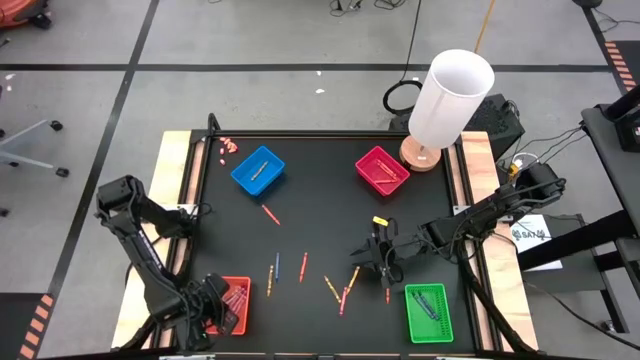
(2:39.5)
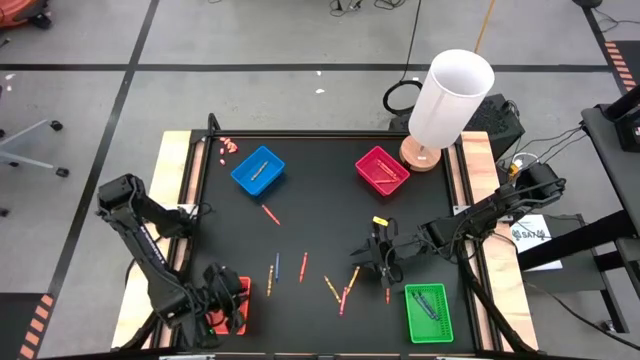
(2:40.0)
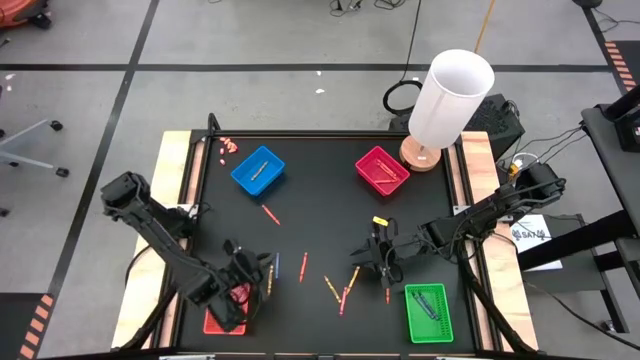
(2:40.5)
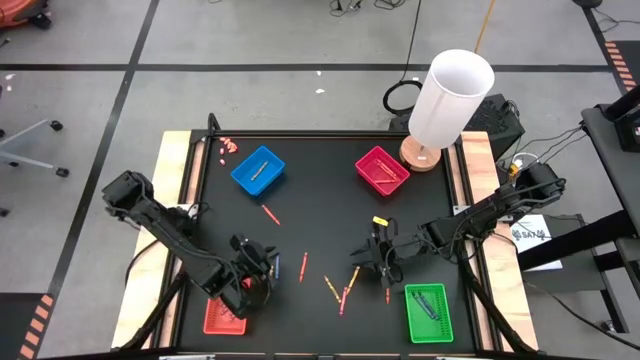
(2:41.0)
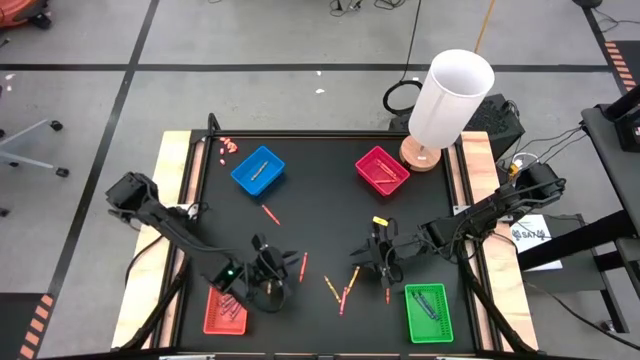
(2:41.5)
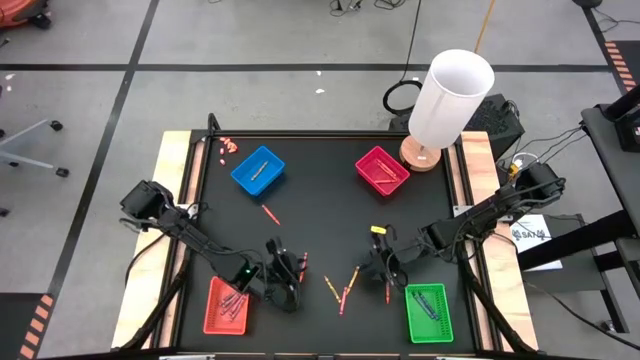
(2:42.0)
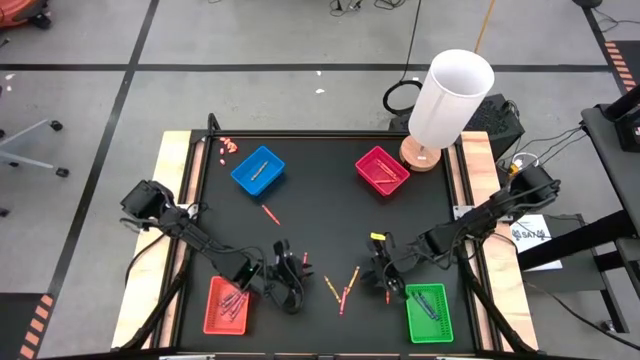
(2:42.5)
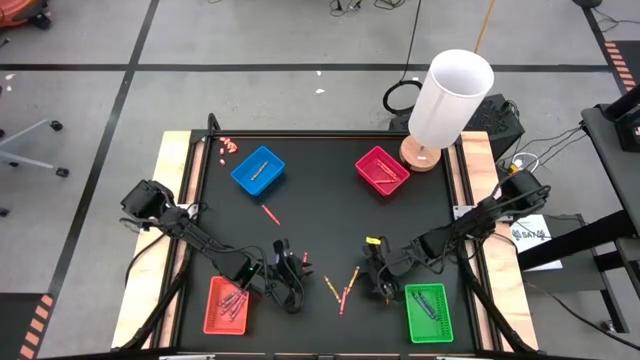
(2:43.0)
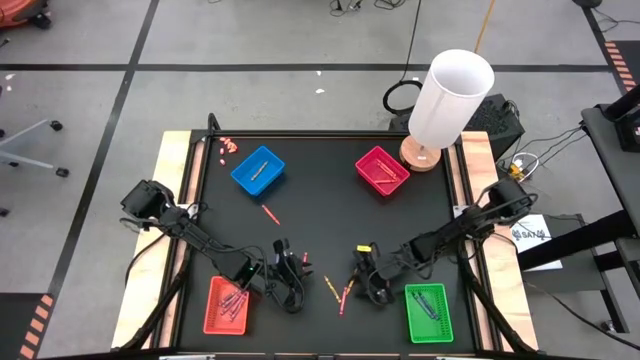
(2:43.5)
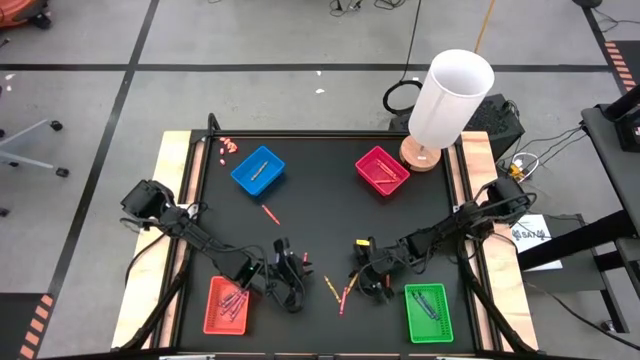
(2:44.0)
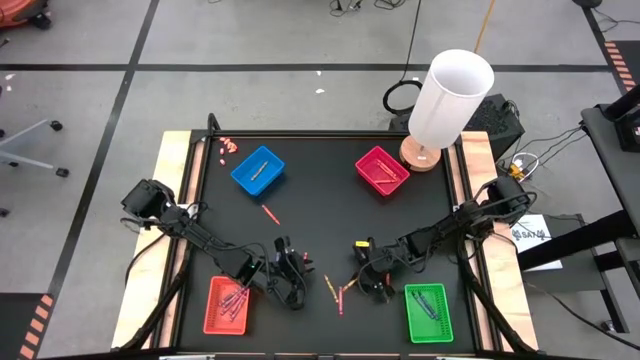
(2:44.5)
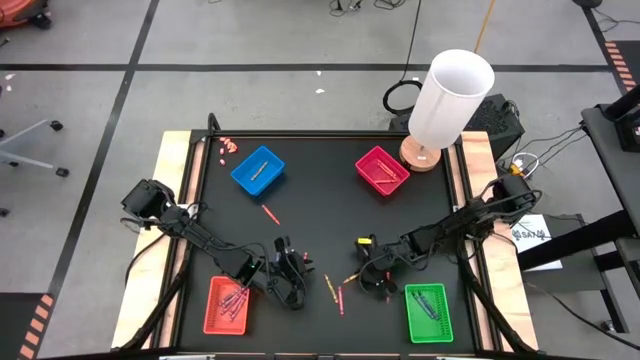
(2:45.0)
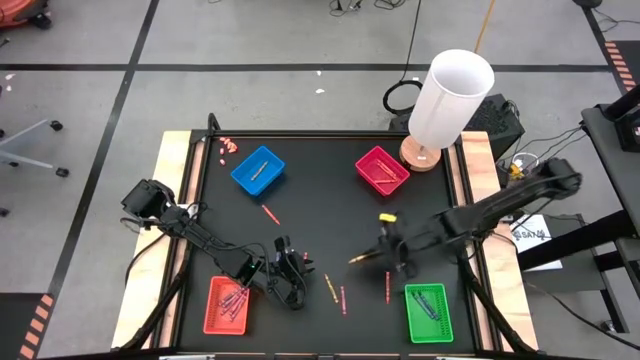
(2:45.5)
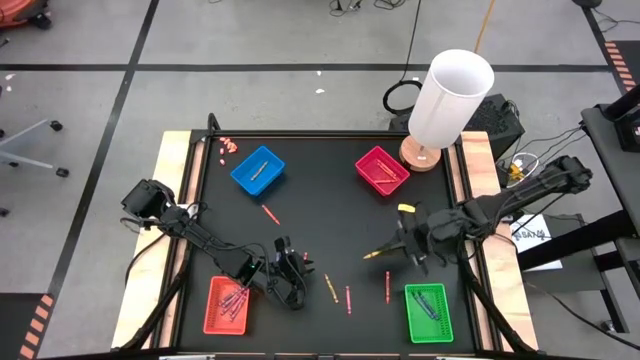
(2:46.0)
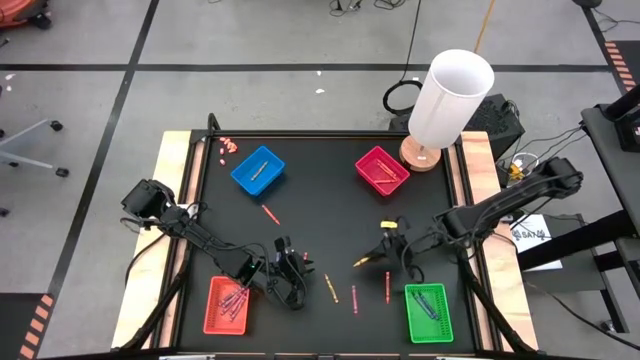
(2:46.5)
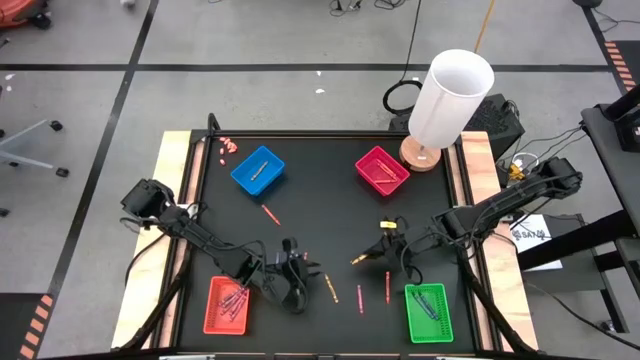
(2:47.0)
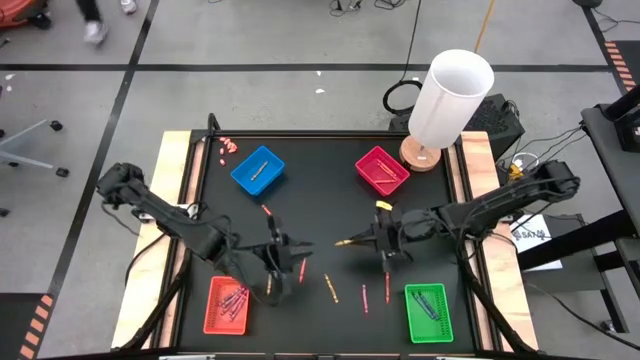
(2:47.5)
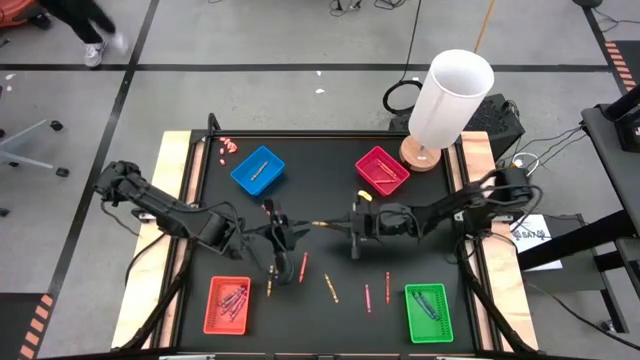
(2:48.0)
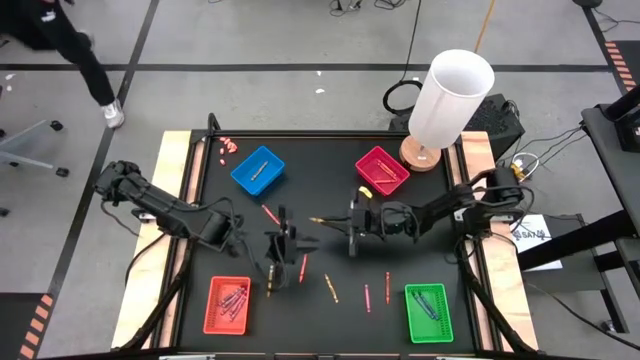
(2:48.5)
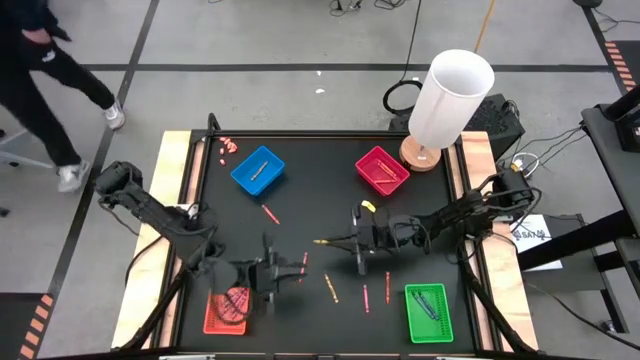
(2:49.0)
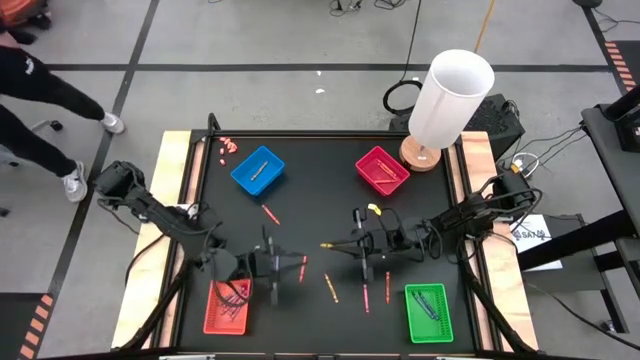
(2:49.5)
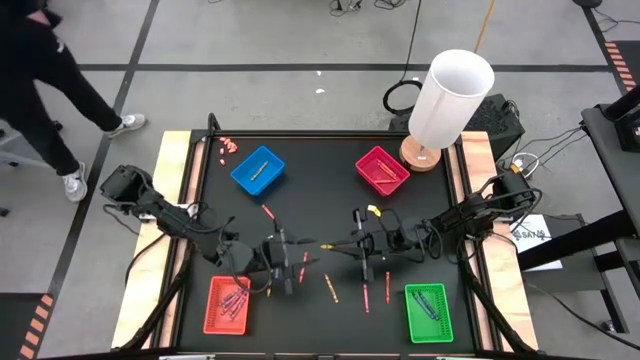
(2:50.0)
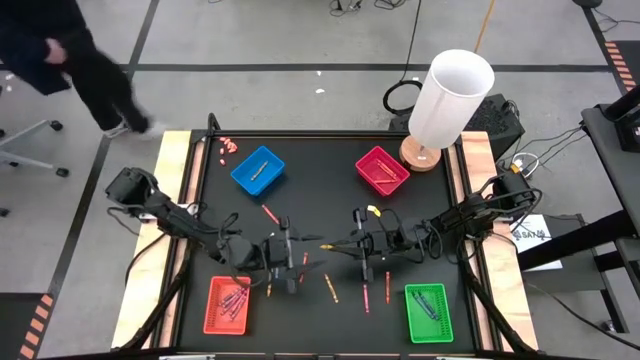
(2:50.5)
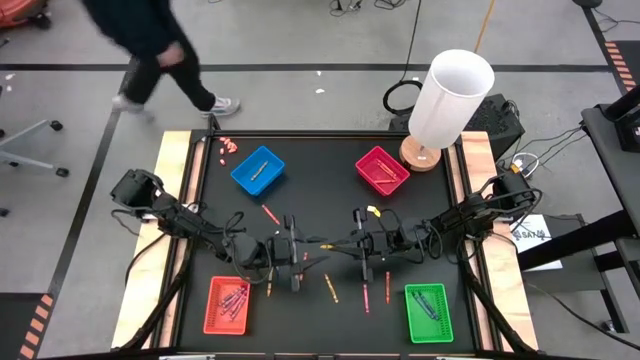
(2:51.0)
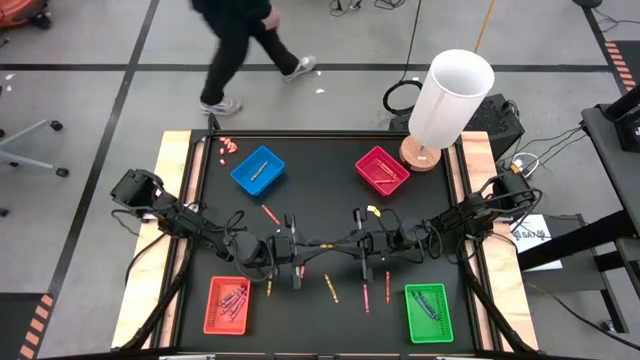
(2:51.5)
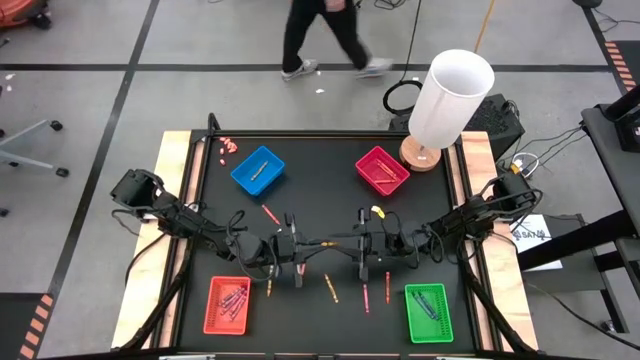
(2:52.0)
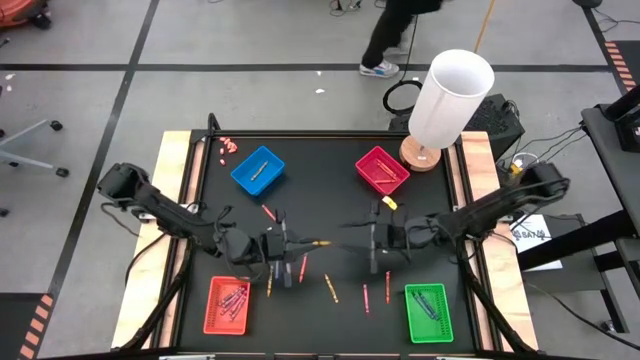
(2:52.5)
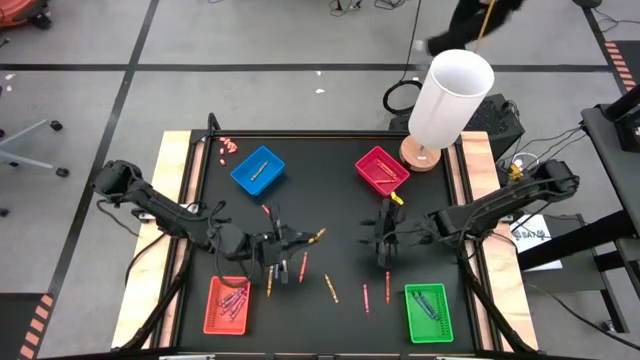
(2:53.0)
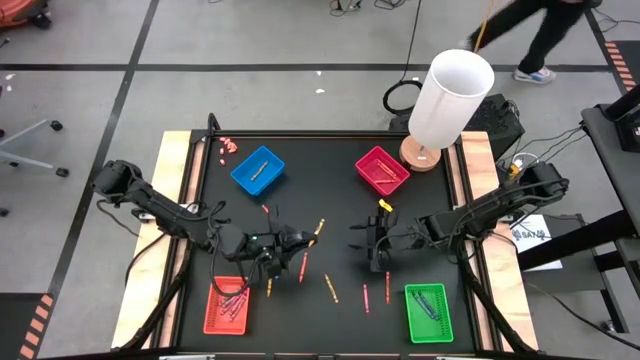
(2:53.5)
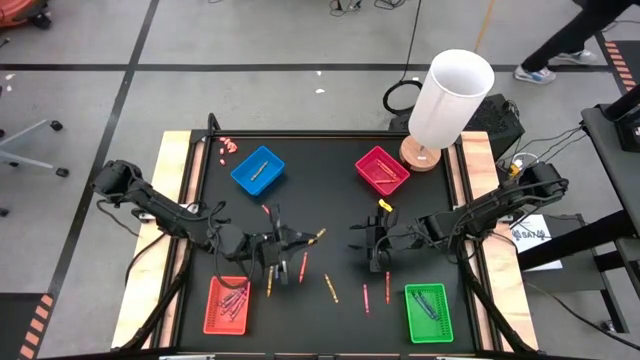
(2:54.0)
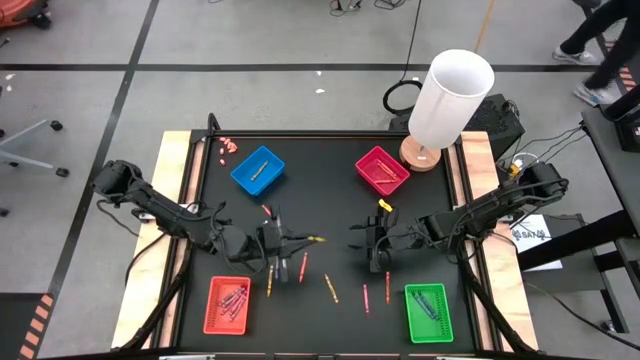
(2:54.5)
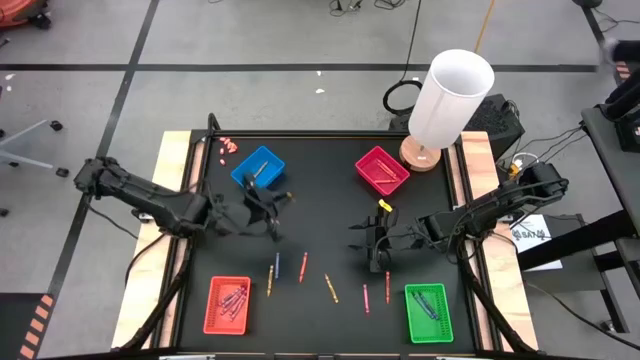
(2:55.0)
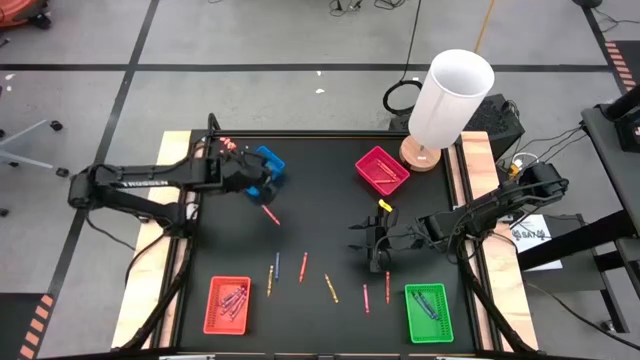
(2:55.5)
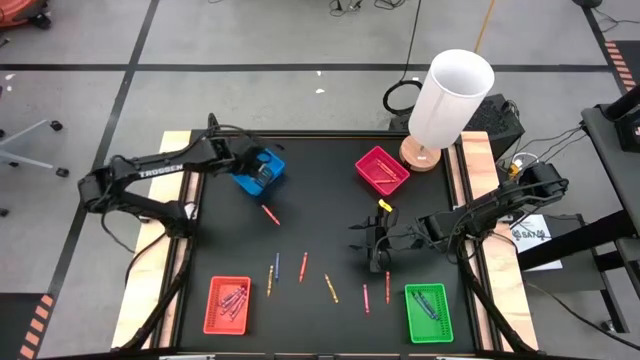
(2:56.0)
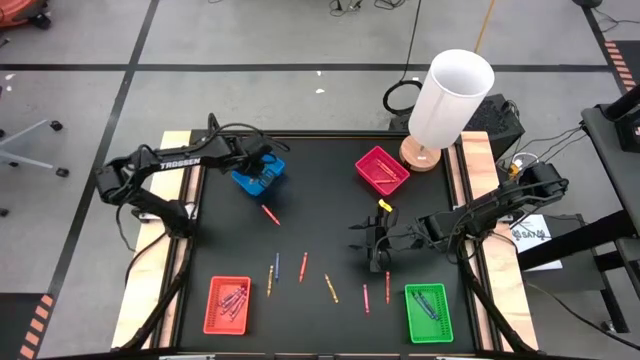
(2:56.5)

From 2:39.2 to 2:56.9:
Task: Sort crayons
Put the yellow crayon into the blue bin

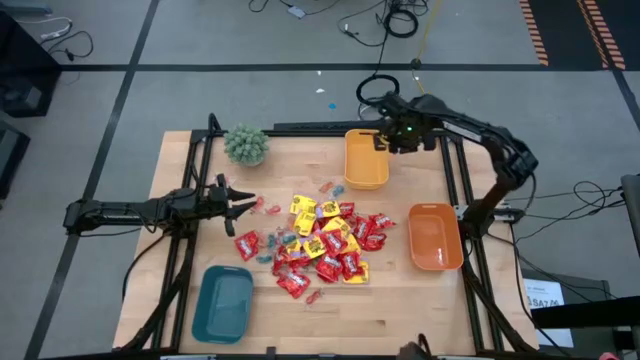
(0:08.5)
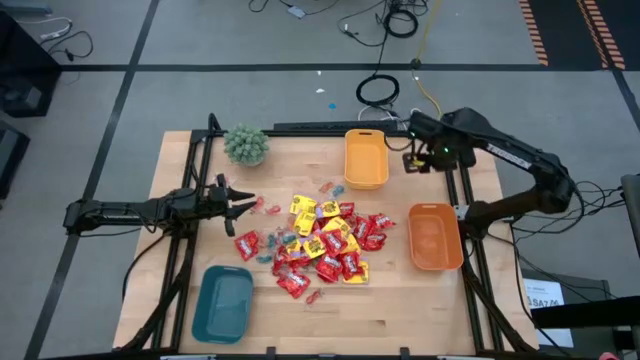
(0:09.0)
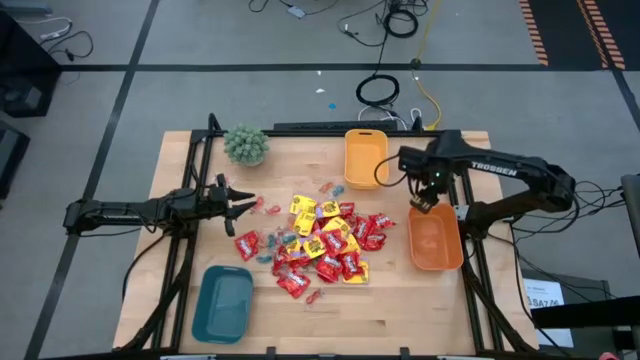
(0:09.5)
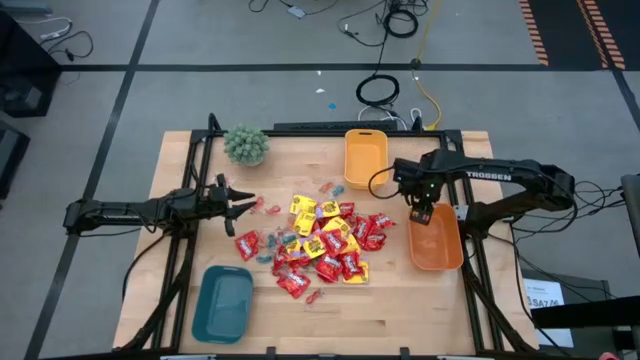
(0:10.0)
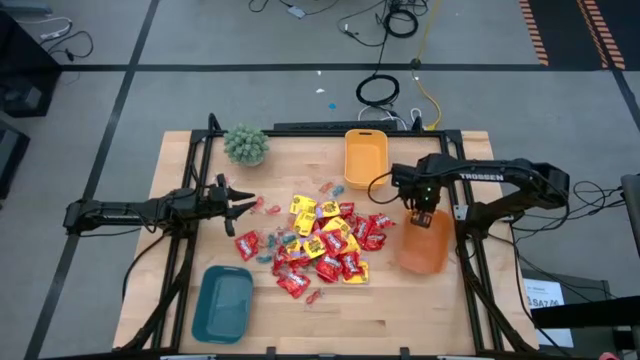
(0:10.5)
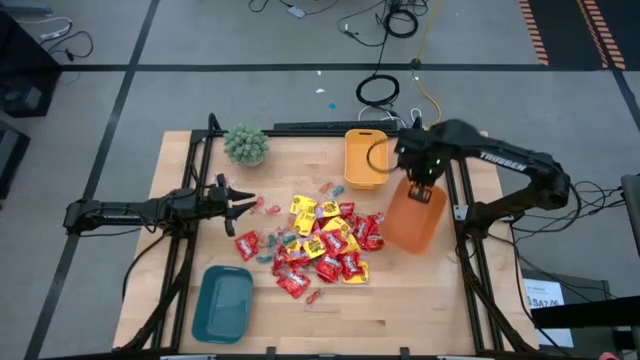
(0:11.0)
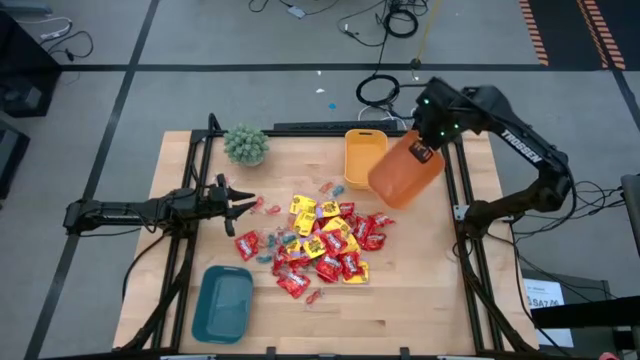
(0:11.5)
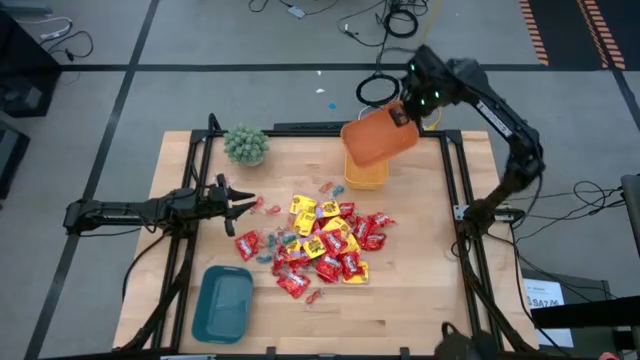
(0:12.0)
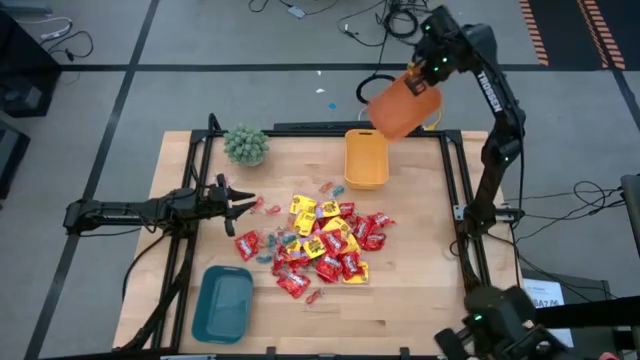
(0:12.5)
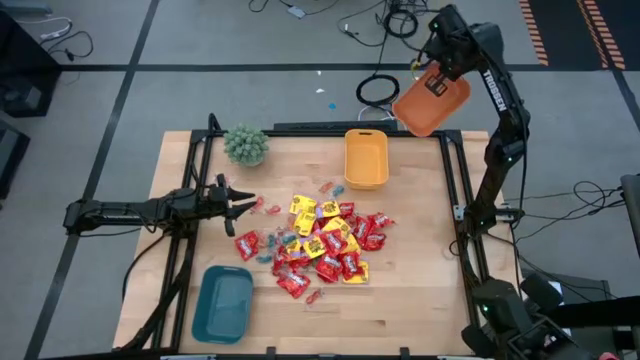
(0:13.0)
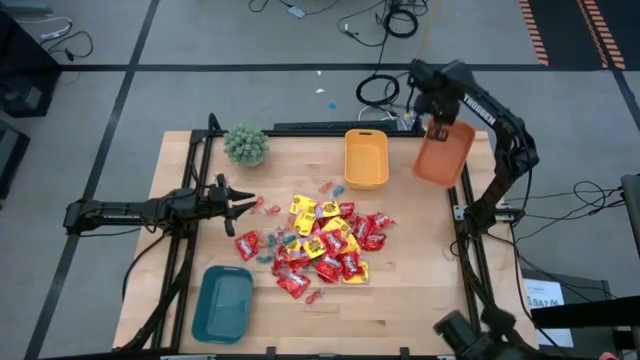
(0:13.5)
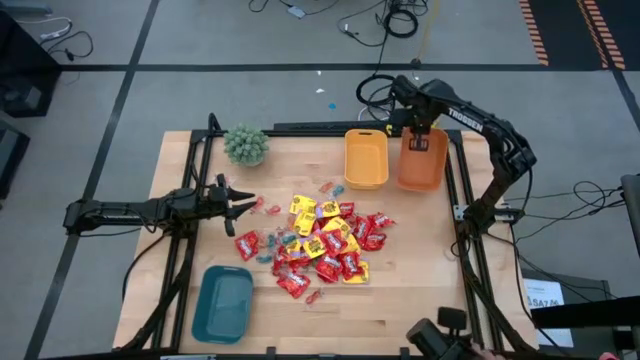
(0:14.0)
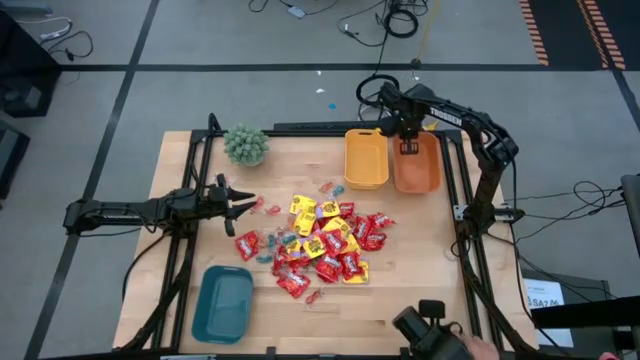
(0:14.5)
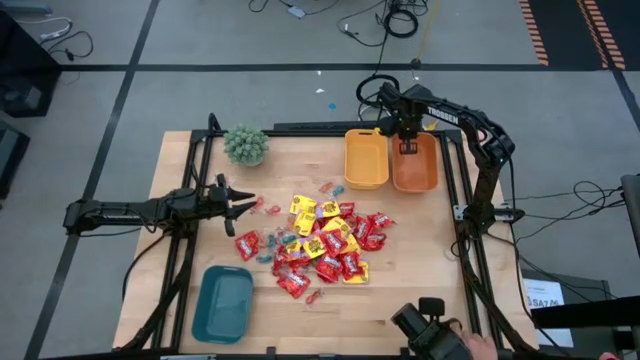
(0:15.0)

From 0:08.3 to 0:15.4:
Task: Sort candy
Move the orange bin to the left side of the yellow bin
